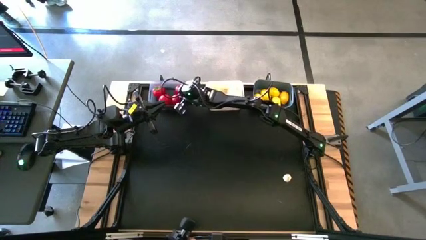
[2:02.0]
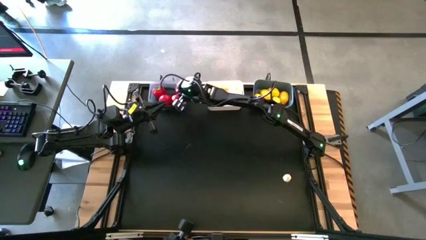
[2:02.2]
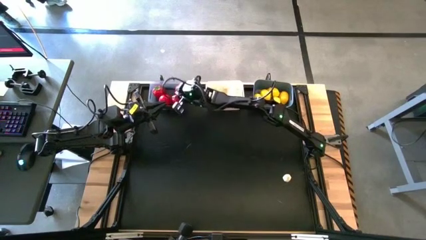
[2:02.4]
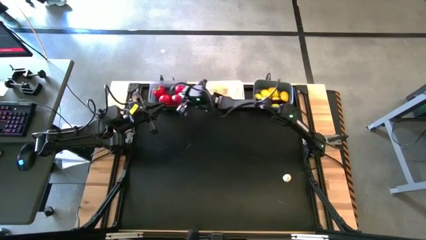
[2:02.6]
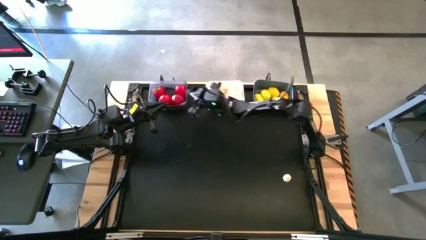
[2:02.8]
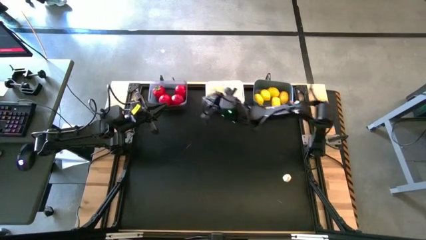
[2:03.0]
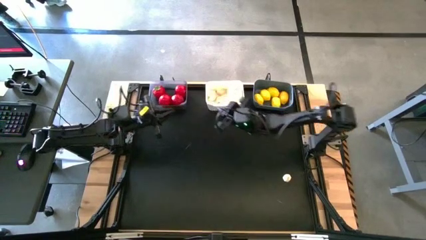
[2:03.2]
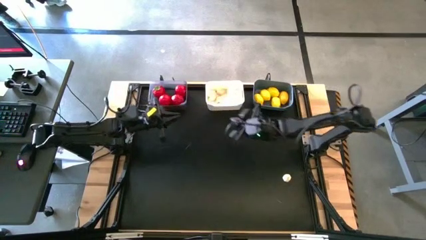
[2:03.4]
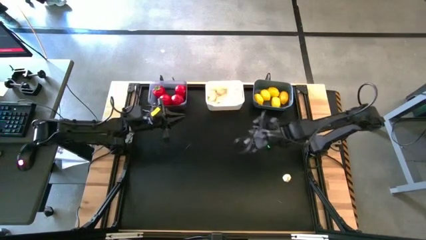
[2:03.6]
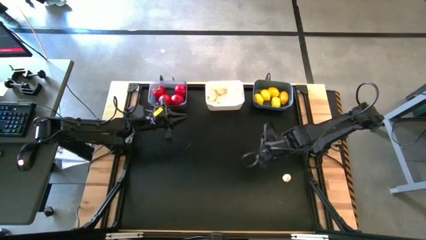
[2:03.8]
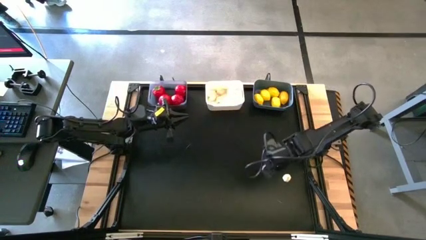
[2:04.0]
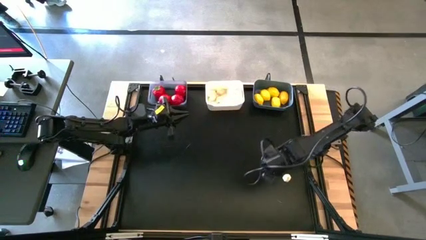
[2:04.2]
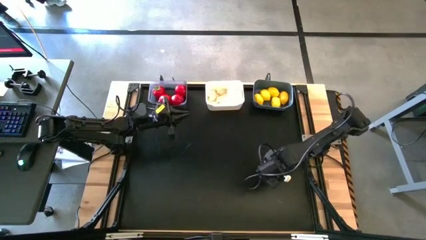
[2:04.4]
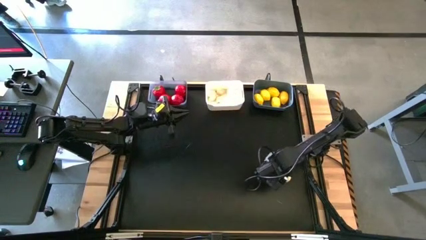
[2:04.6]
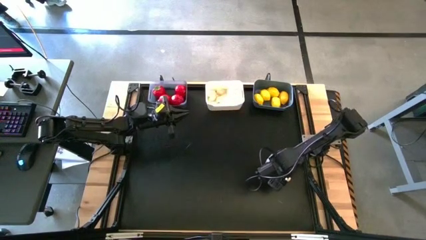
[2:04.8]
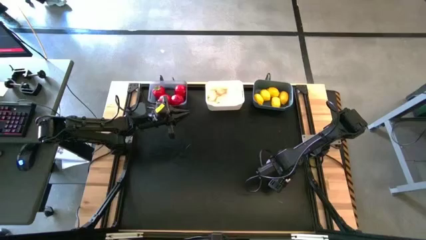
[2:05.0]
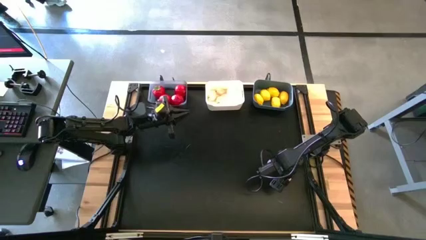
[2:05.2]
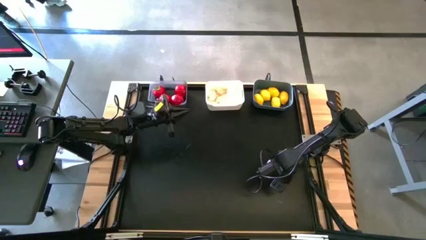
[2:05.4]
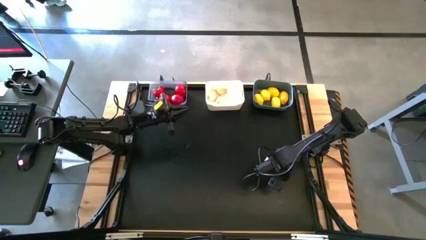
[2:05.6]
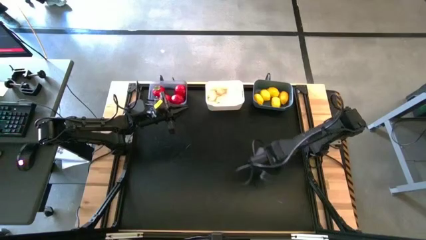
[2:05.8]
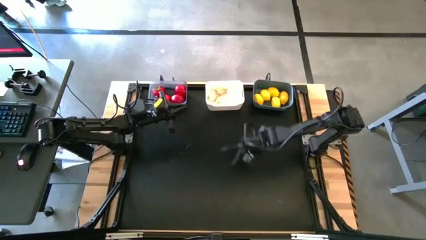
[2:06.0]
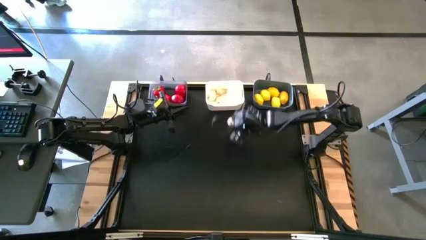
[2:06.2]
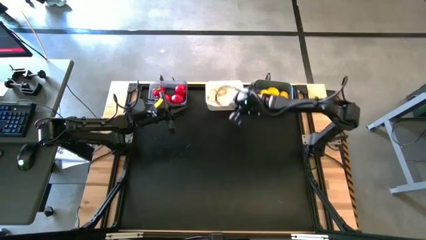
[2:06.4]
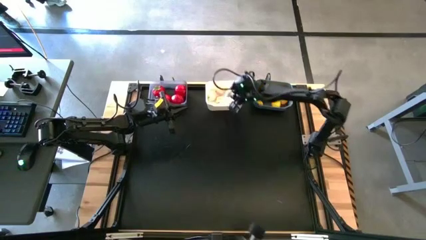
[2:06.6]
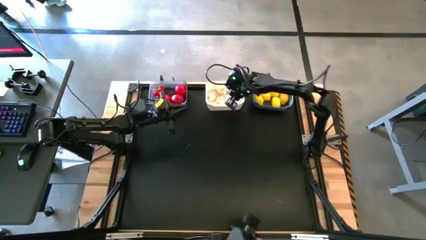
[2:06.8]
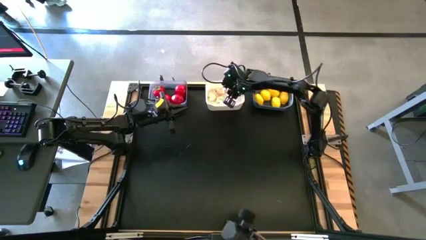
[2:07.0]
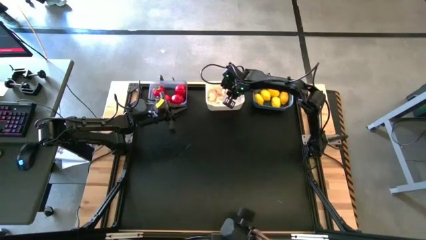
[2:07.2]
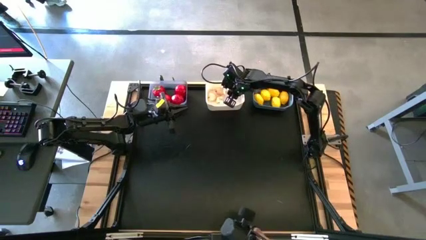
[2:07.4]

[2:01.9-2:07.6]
Task: Sort produce into baskets
Put the garlic into the white bin

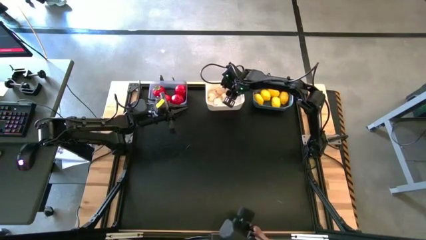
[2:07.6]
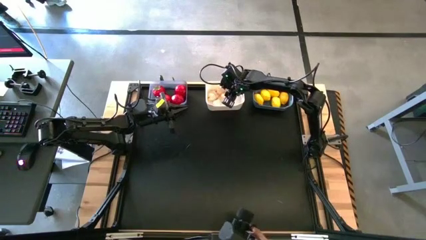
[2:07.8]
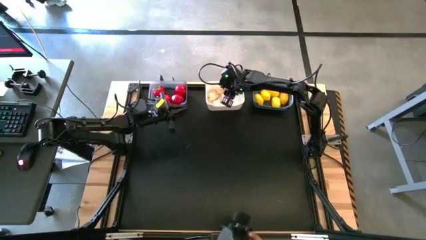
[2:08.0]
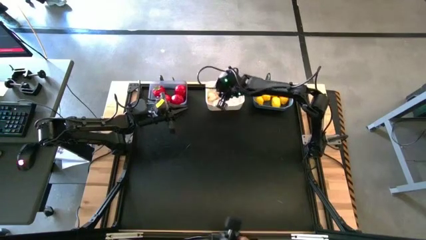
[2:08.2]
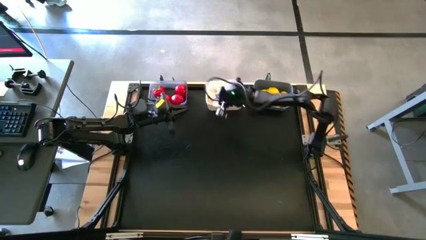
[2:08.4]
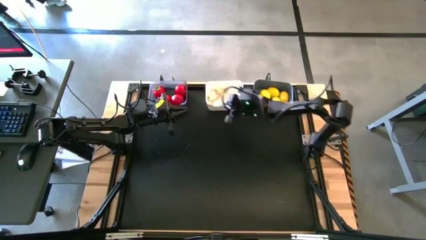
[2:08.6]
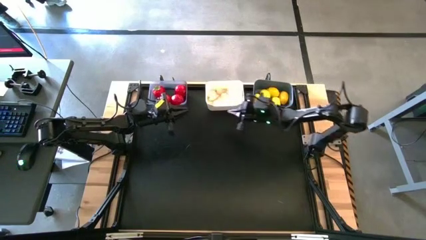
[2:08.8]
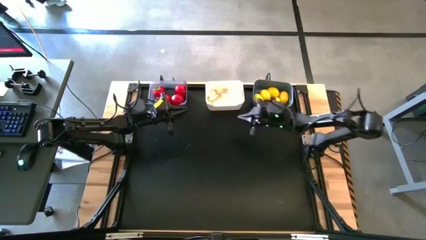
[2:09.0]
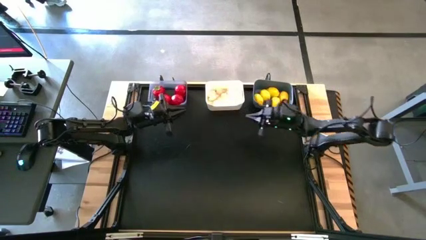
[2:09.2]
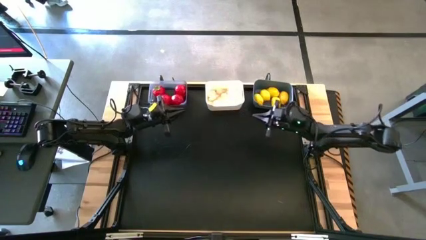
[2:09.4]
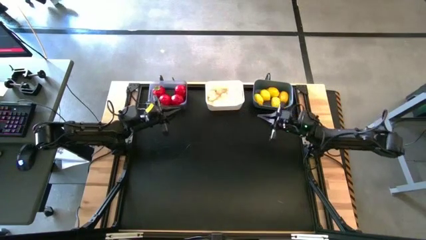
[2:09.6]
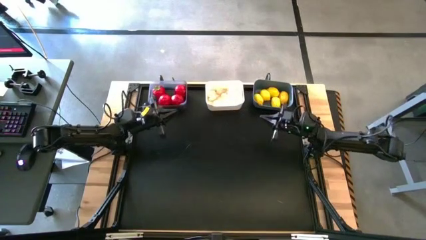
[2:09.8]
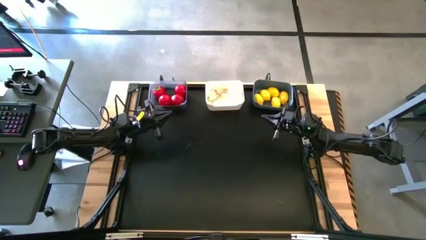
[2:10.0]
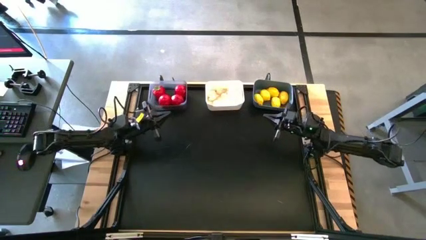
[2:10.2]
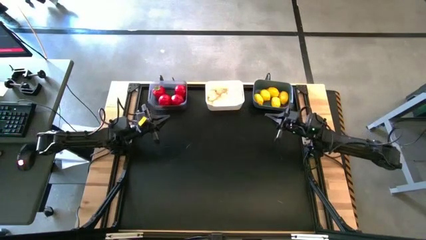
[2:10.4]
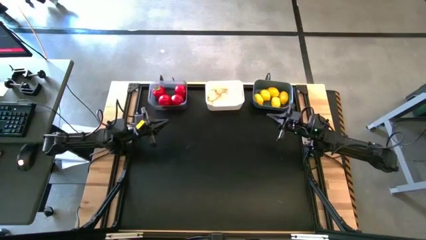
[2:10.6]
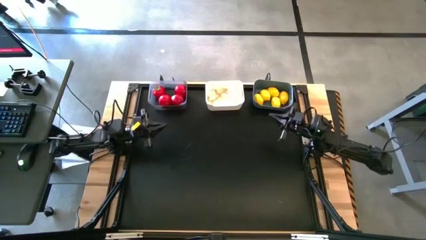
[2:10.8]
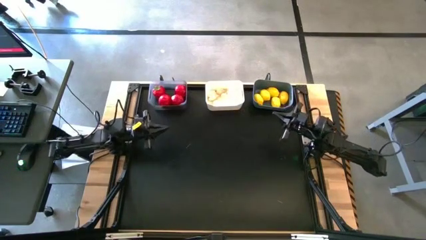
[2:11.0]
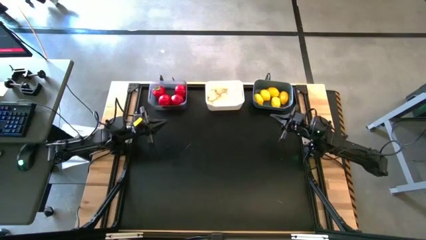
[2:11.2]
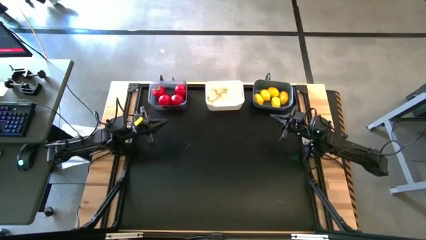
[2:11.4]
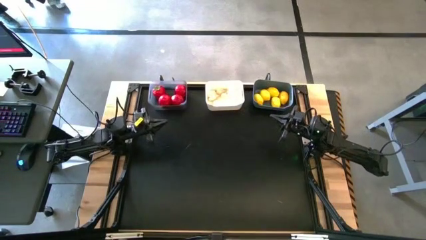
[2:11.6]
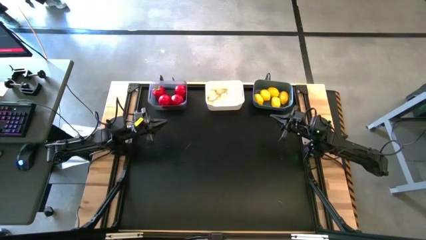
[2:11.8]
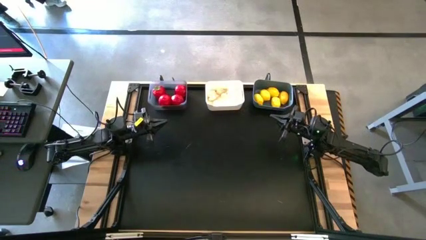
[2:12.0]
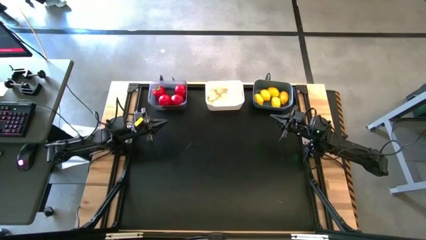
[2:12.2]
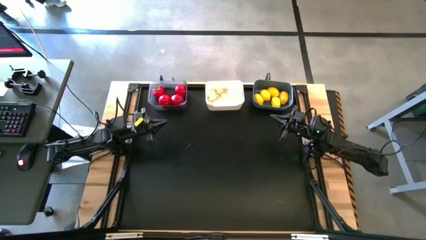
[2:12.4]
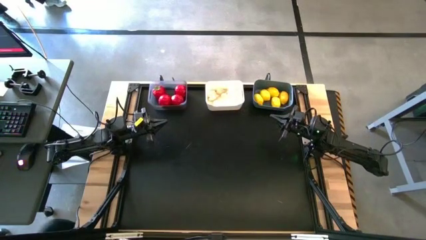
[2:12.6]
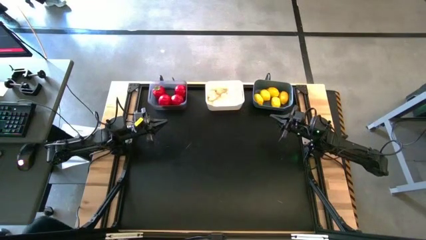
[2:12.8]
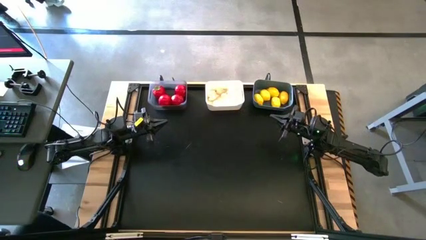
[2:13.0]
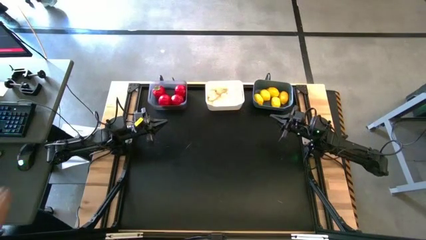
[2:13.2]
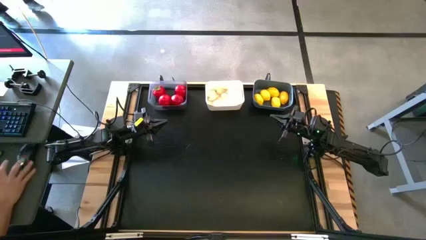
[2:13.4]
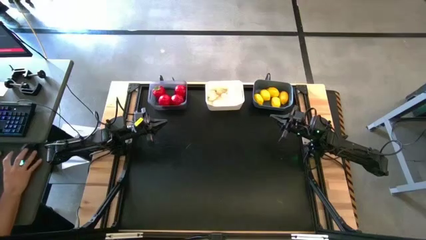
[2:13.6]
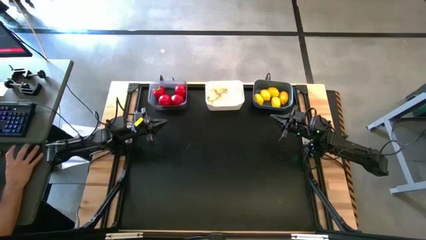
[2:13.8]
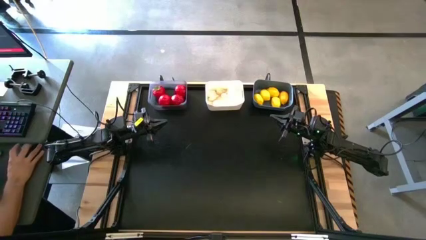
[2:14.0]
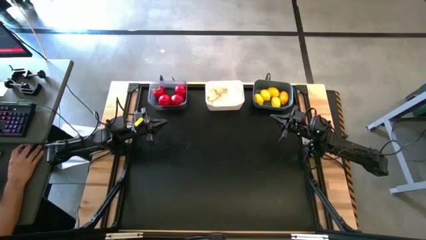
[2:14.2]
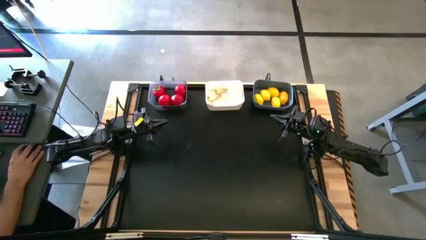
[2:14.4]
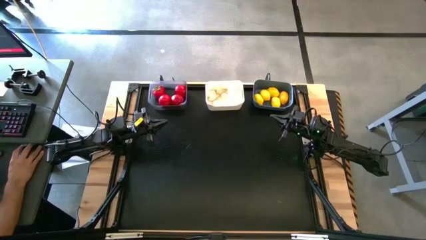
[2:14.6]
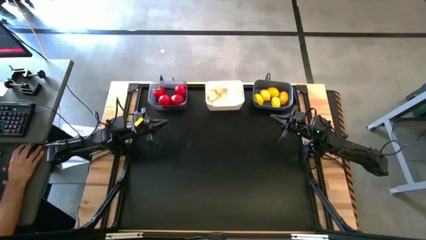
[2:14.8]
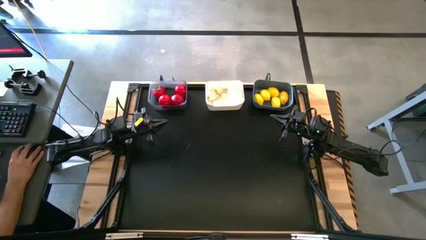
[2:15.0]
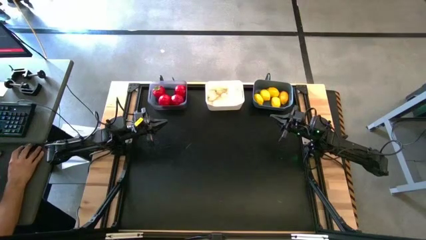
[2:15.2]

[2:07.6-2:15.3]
Return to Home Position

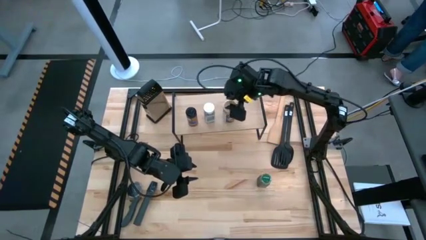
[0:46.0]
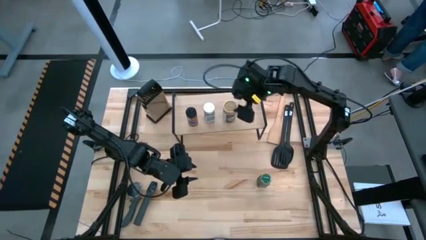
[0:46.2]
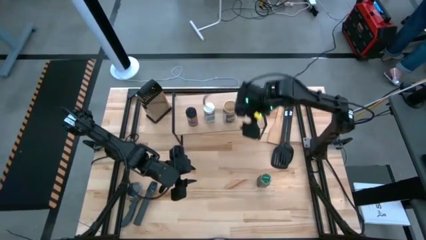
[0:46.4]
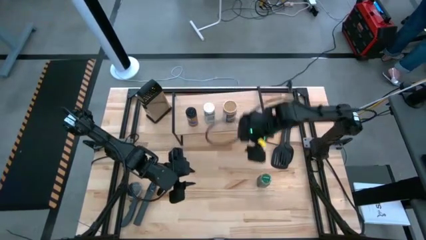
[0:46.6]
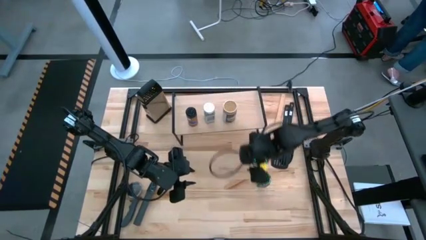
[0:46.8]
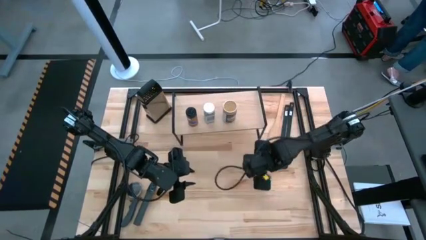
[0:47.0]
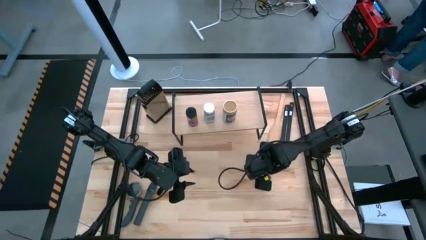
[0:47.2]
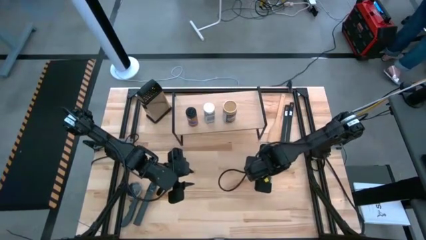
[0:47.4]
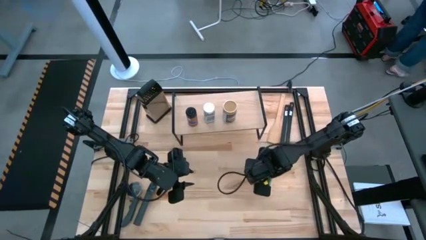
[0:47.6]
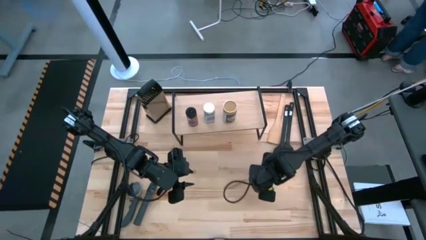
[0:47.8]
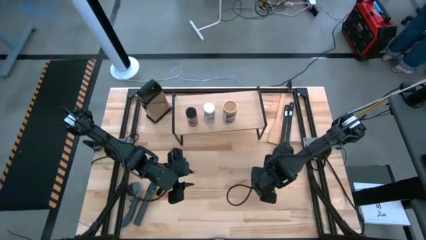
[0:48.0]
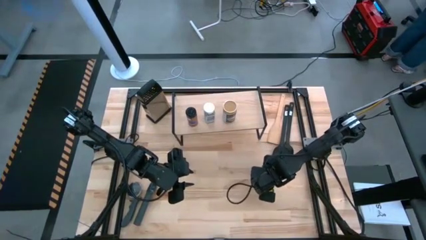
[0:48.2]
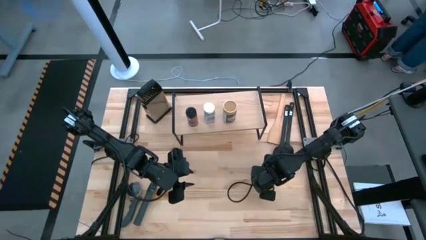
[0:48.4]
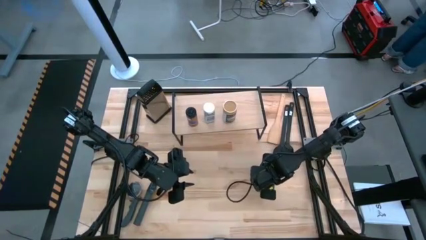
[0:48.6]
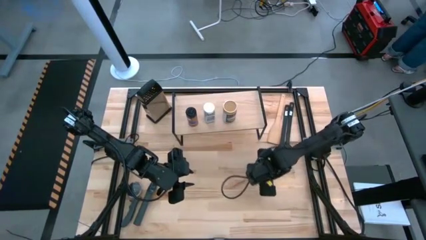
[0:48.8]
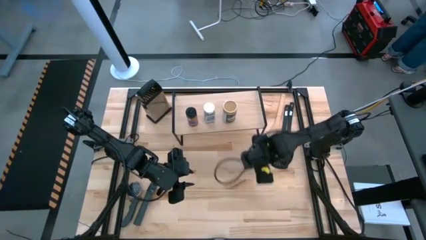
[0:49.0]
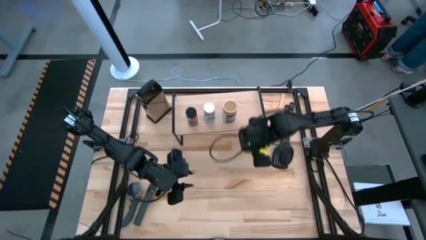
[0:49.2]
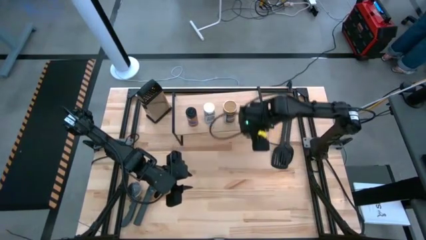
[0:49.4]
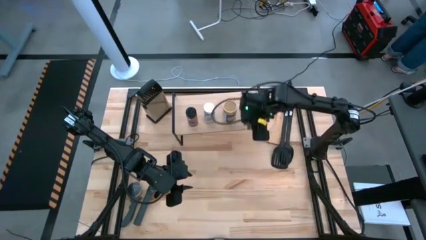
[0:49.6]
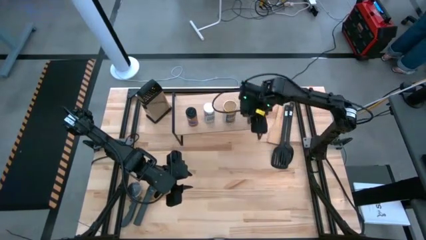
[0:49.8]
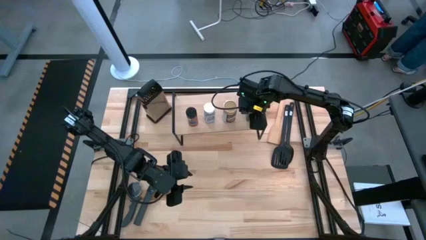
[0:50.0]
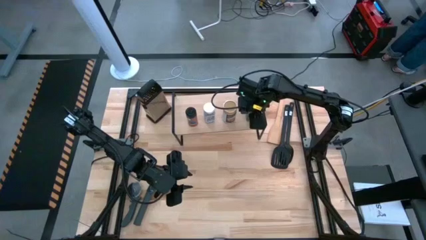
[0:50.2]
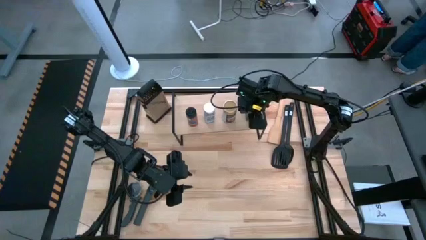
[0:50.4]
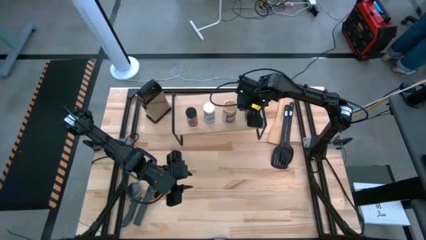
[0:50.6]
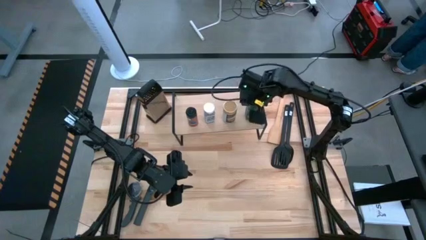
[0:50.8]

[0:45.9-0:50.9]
Task: Shelf spices
Put the green seasoning bottle on the shelf aligned with the other golden seasoning bottle
